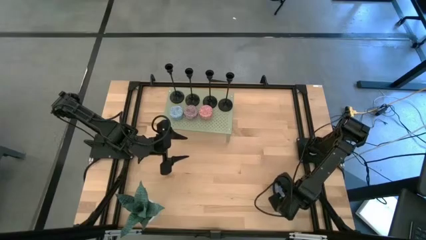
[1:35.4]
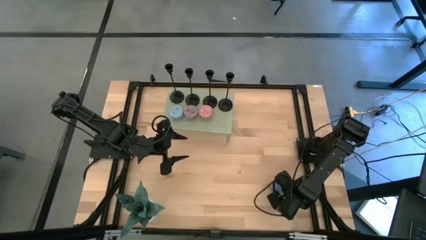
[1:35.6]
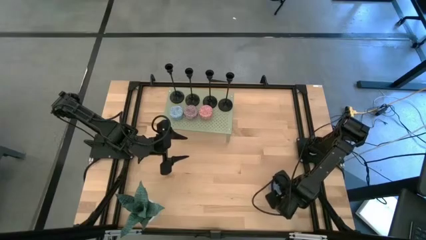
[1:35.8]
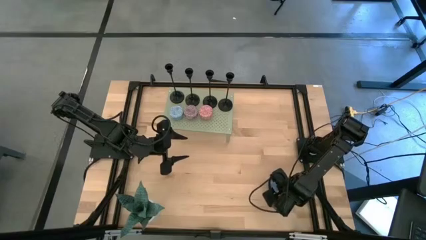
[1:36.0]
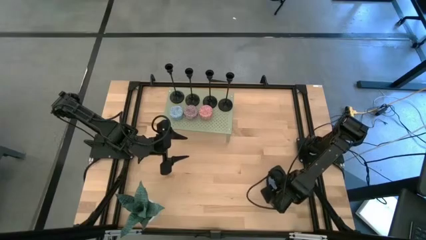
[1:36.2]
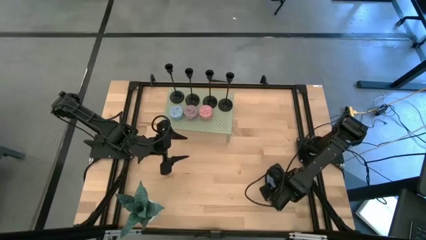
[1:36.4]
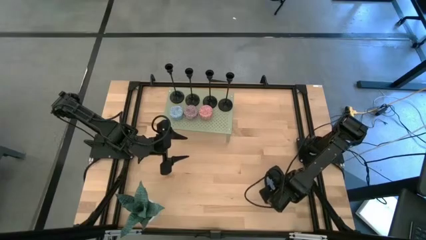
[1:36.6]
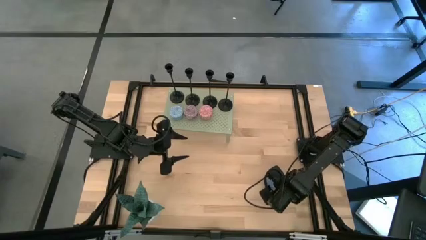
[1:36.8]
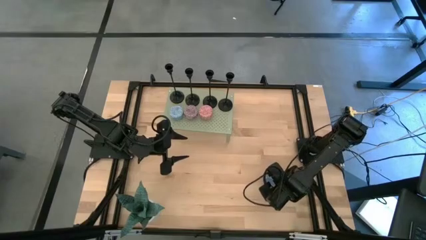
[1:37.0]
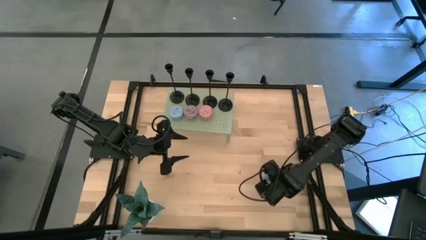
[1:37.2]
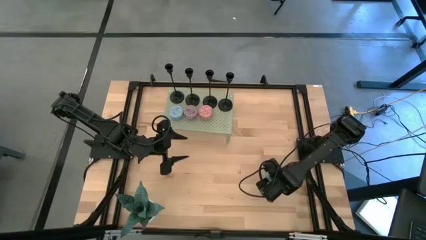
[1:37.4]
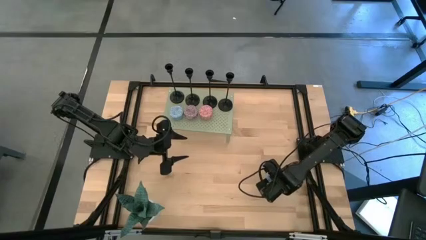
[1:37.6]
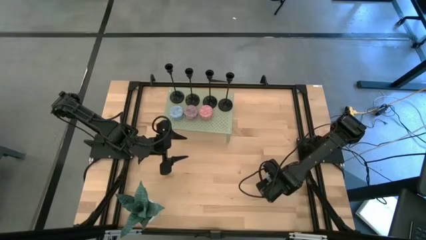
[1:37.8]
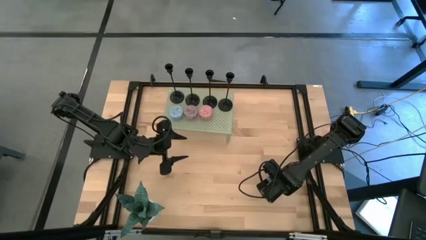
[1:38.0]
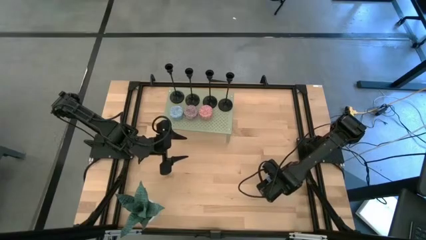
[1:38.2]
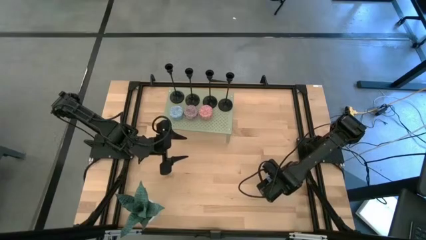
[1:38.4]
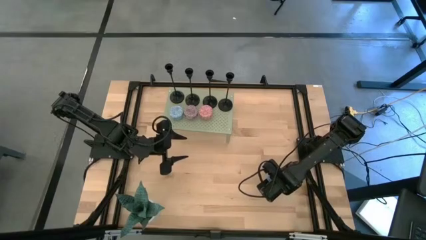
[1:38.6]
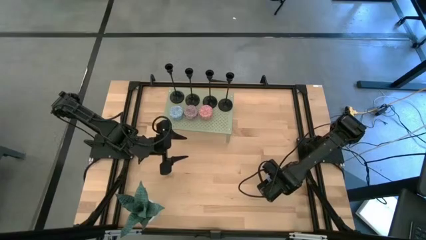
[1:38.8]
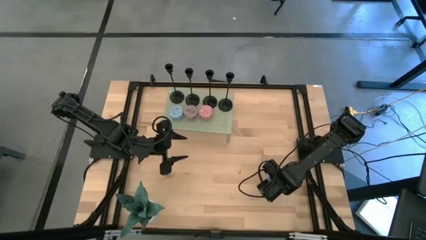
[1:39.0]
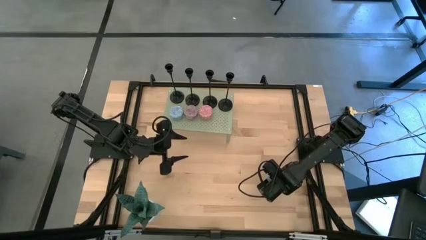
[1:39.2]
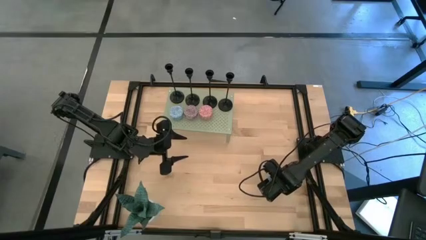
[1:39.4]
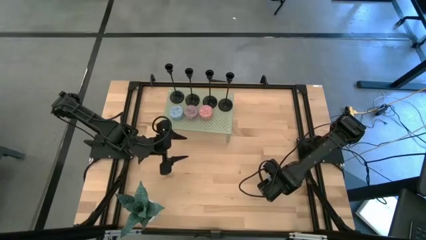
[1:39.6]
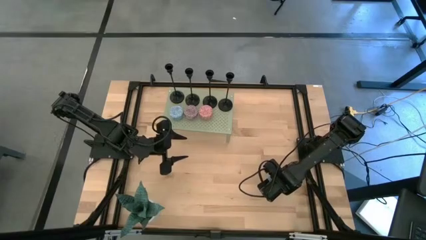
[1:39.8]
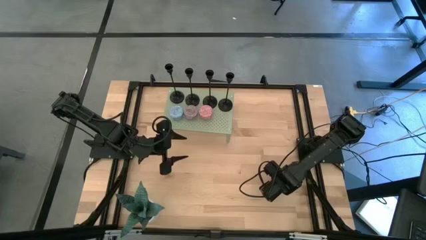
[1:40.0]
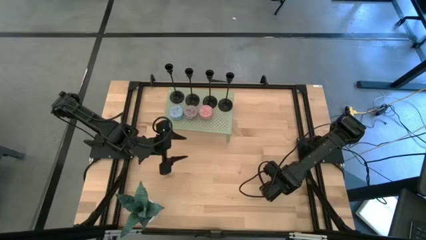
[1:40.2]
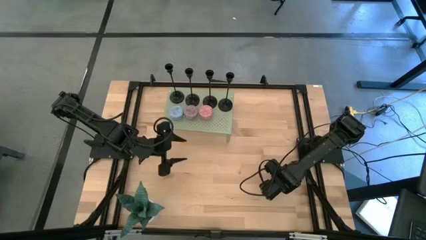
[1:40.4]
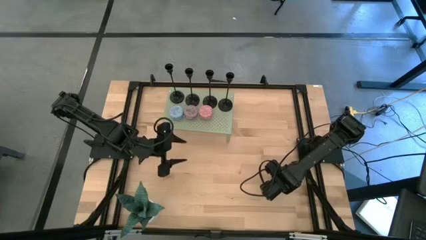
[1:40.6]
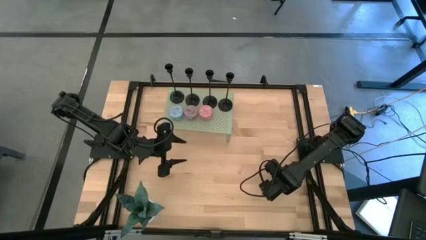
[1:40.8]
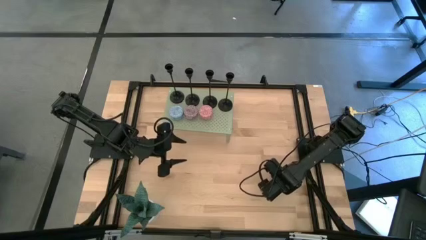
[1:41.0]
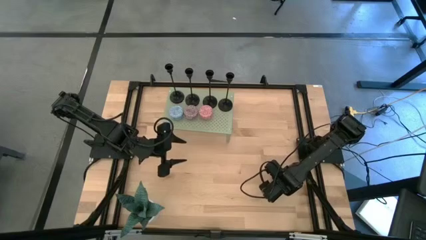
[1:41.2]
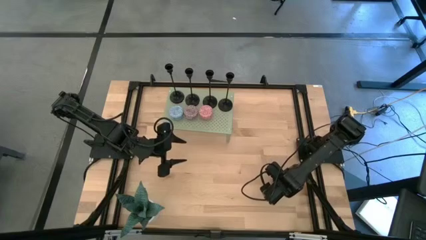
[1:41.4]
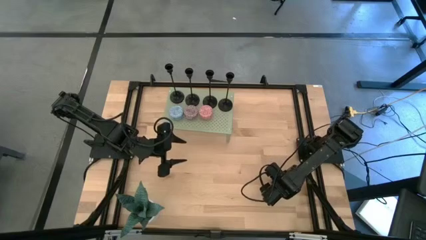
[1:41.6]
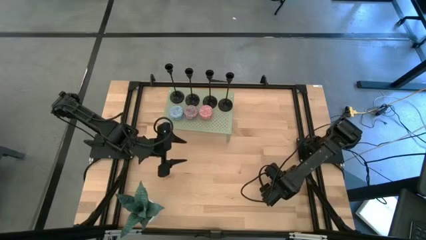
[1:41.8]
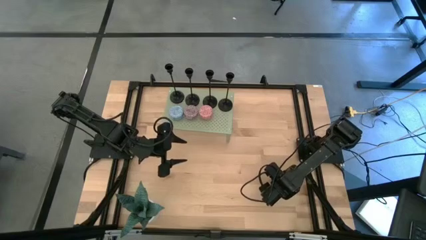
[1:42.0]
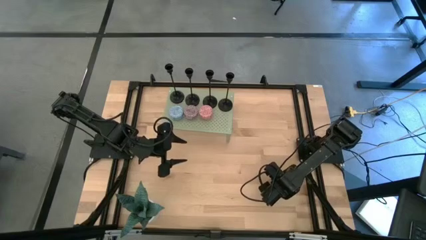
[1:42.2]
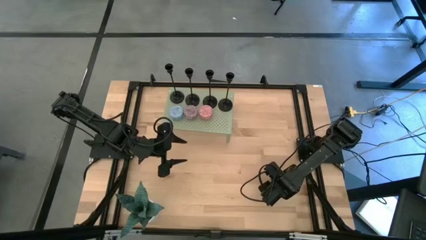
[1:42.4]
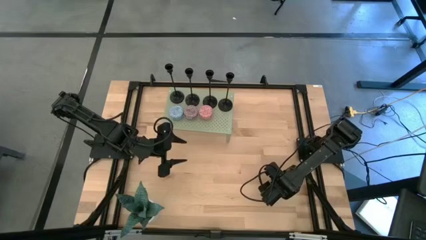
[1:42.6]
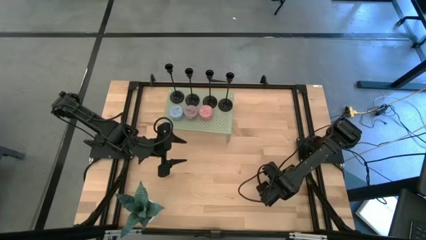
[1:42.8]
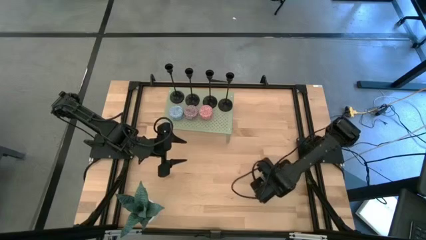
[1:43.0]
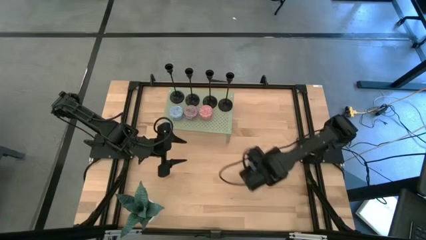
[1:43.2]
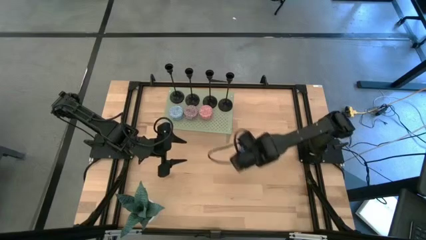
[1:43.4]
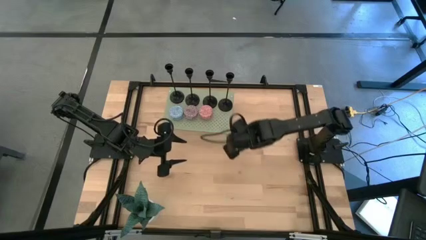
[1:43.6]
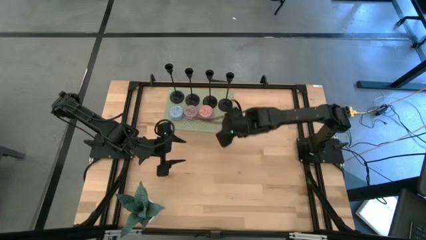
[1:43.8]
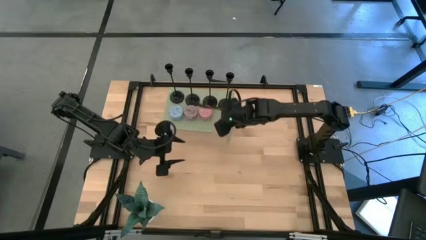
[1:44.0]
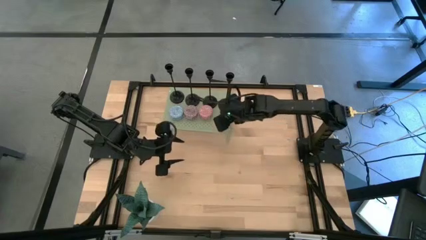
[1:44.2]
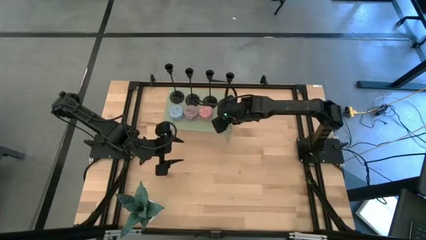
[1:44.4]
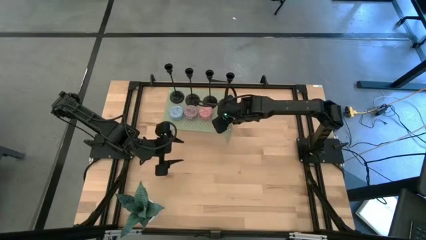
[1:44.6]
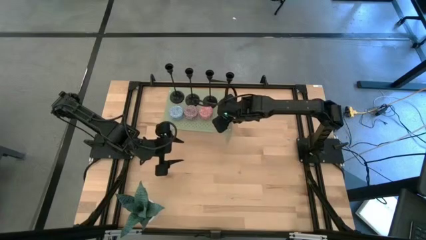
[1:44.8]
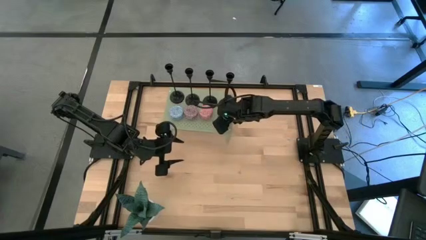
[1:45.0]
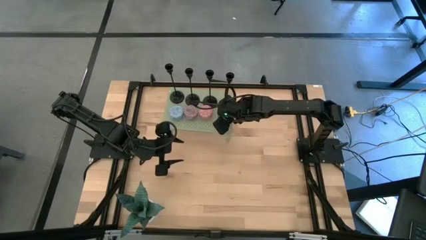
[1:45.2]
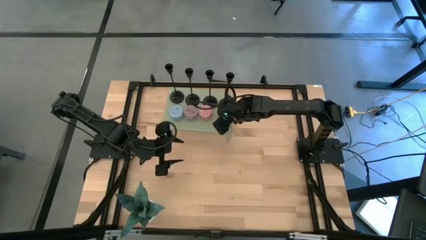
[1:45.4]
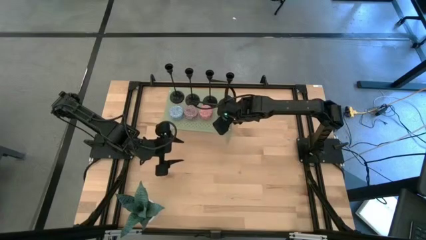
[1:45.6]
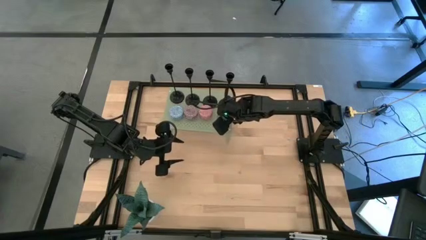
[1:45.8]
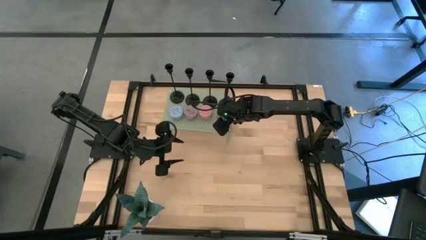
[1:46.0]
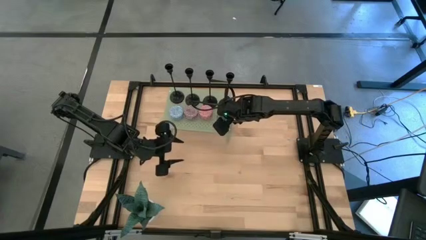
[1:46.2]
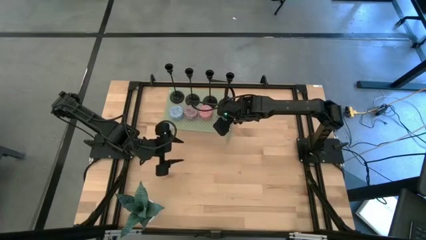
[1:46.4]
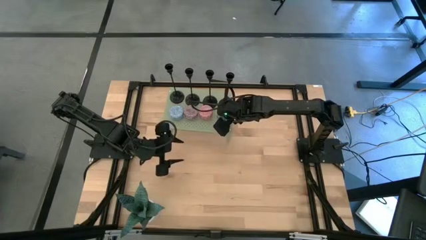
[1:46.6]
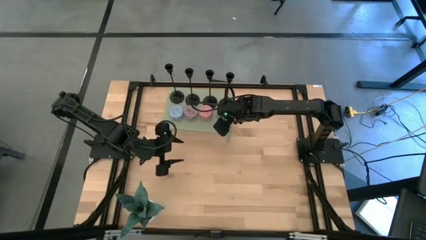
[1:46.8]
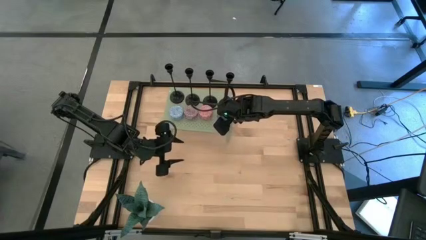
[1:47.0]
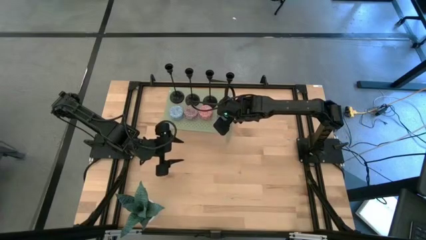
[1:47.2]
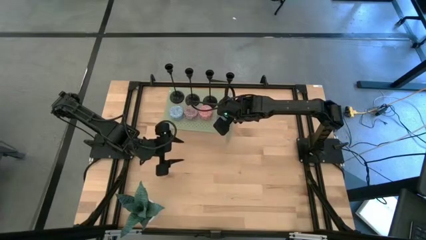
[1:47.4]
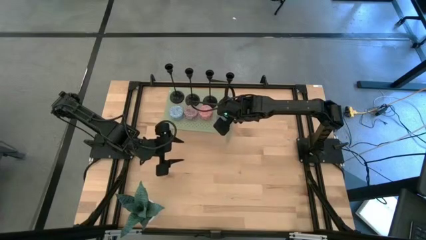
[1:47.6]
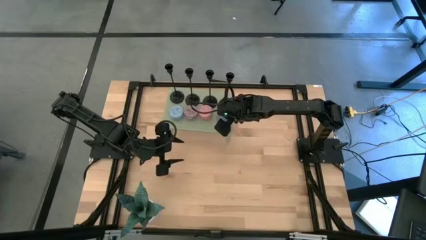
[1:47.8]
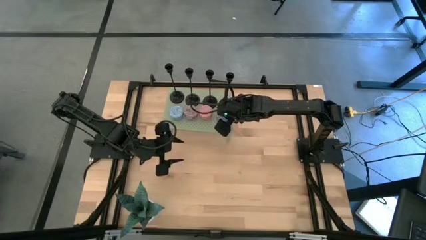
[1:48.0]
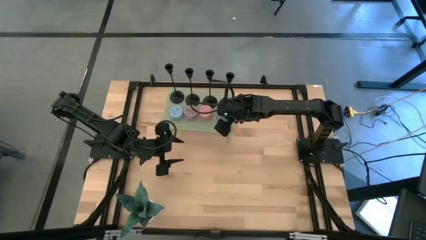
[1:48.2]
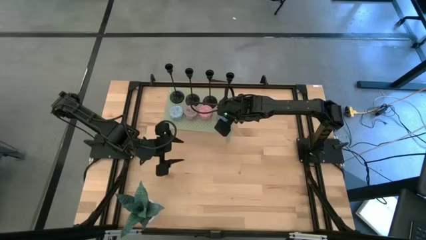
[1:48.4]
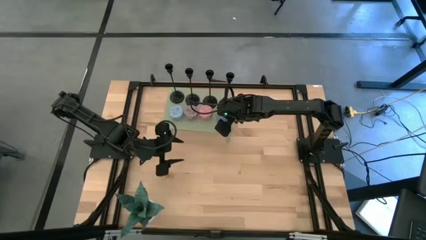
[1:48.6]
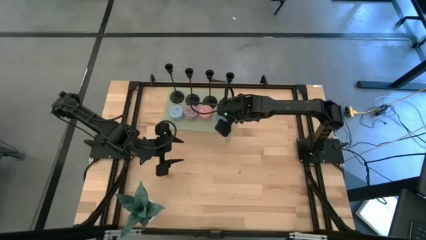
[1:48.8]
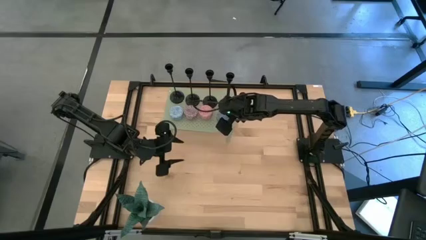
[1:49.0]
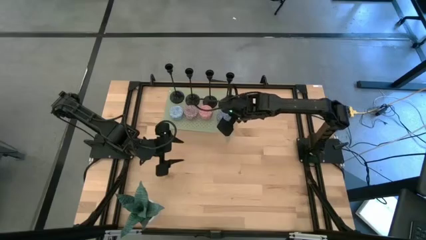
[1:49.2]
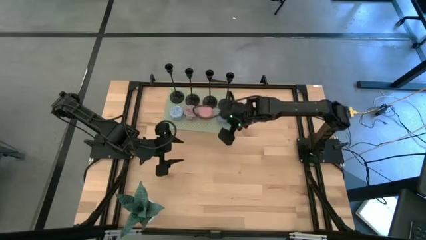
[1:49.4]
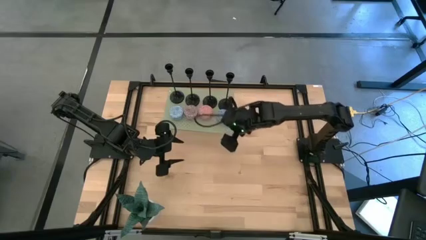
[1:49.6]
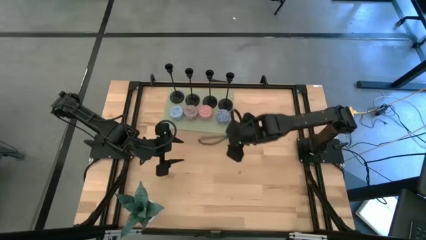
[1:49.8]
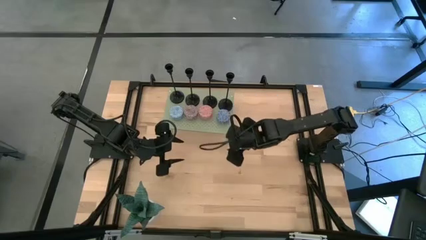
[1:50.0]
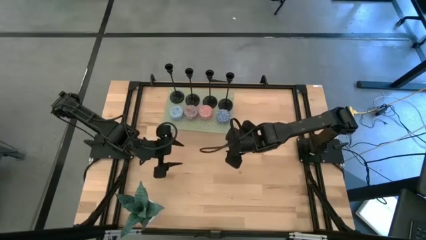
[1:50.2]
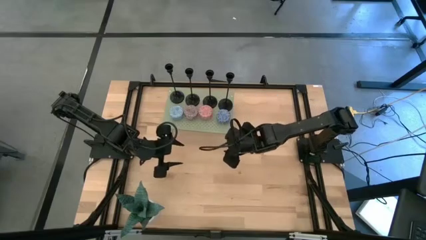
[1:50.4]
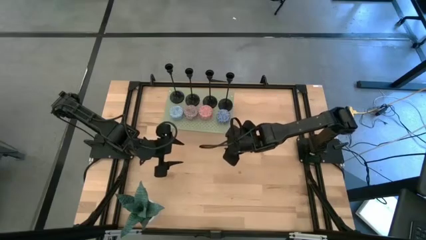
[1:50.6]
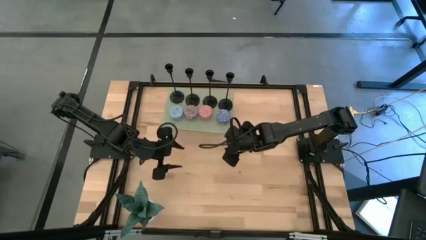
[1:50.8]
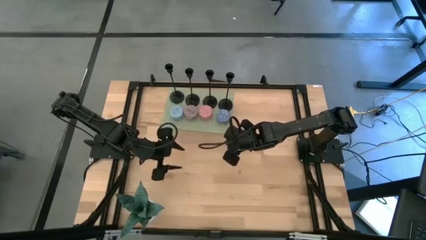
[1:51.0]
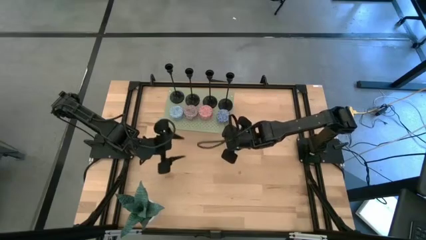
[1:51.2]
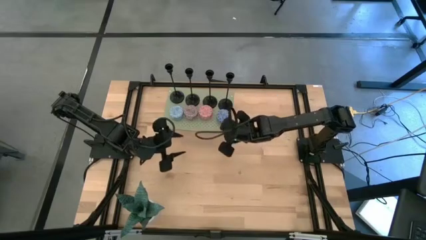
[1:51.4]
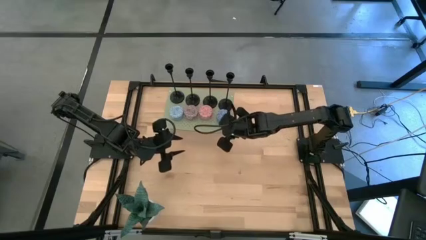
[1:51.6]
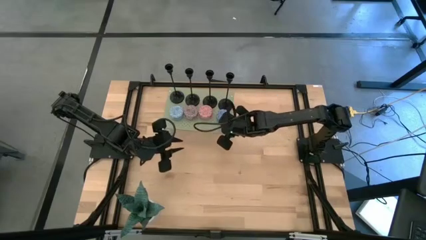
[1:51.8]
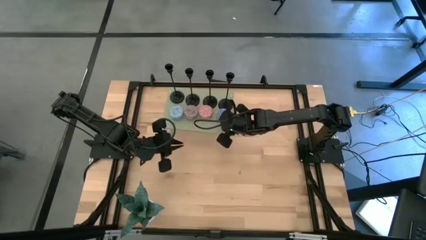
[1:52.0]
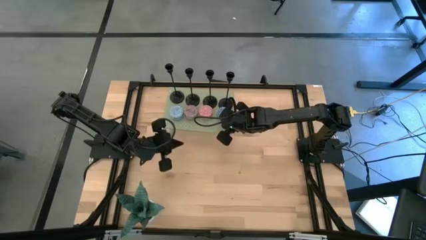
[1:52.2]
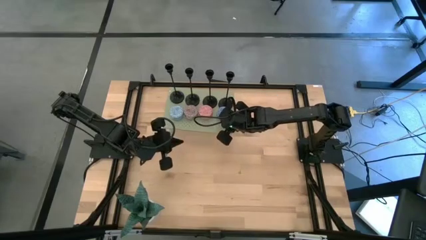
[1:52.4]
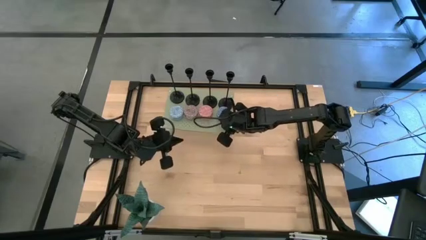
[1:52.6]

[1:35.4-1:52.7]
Task: Pick & Place candle stick holders
Put the blue candle on the shelf aligned with the other candles
